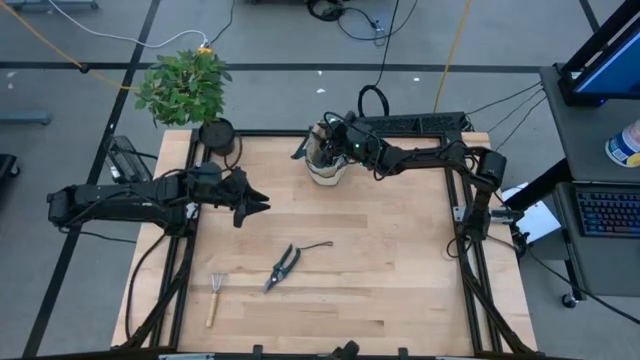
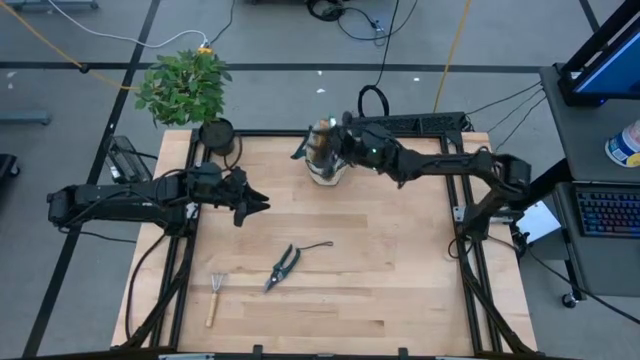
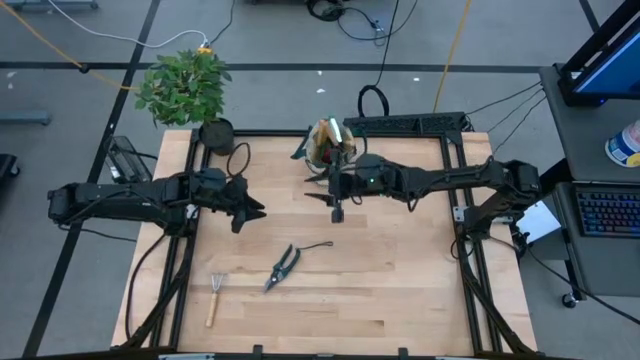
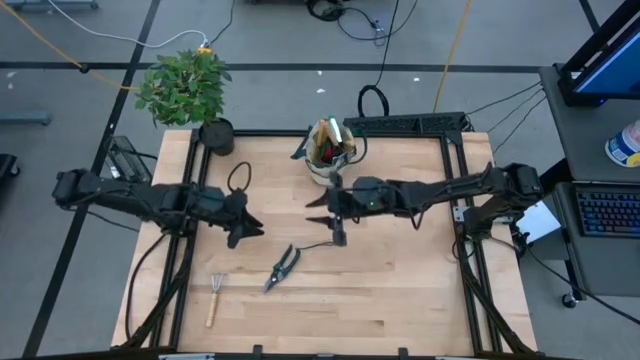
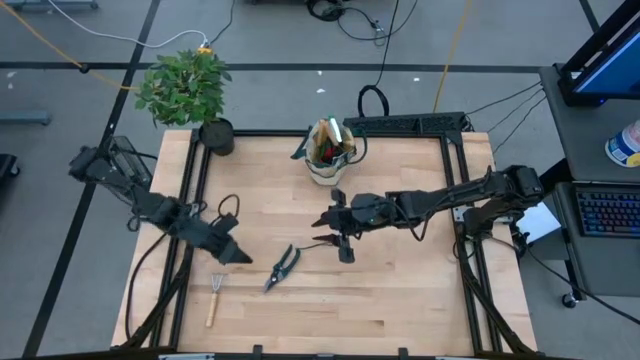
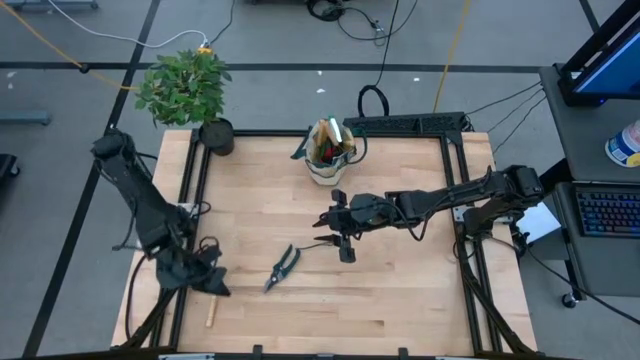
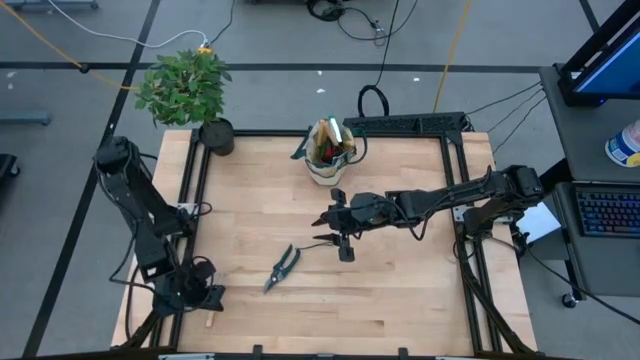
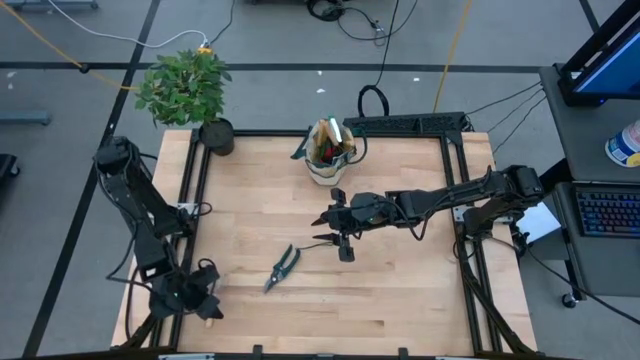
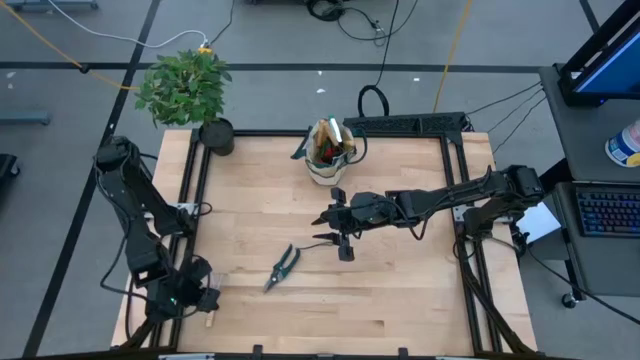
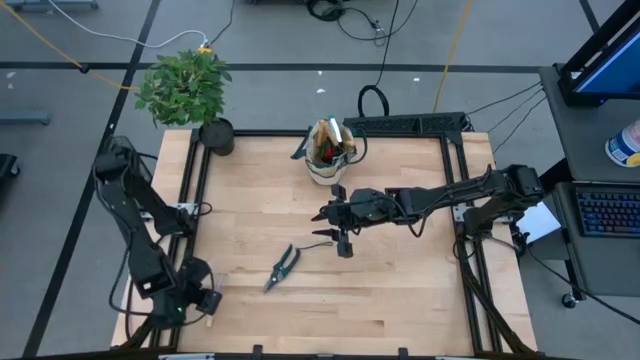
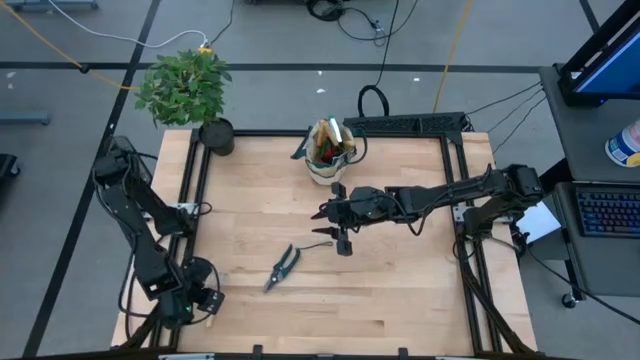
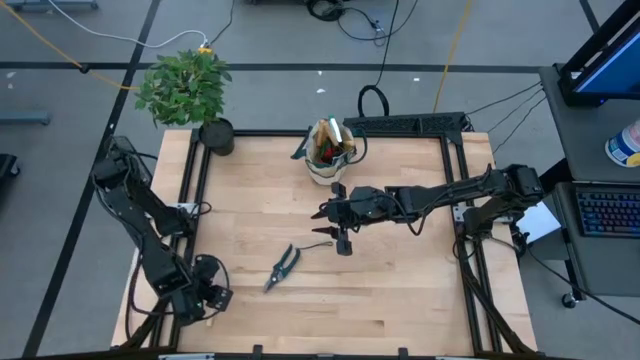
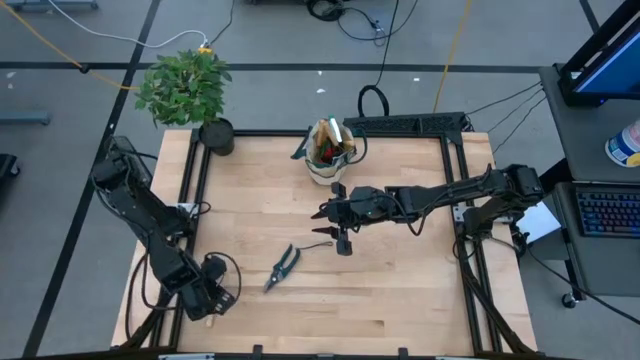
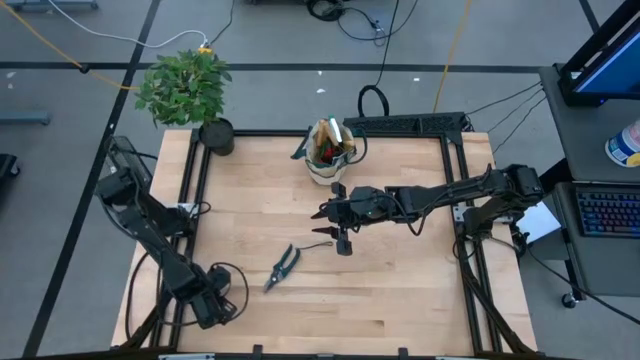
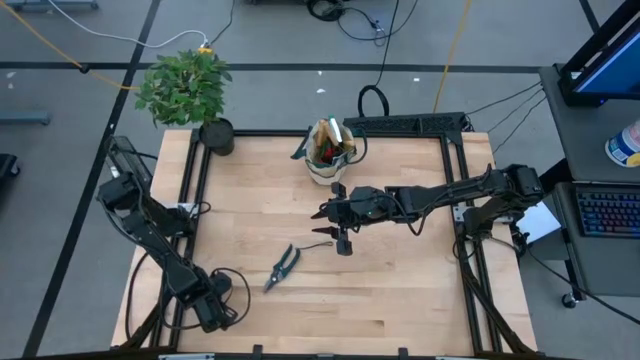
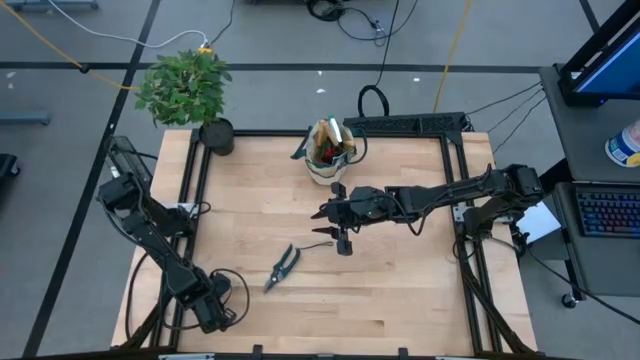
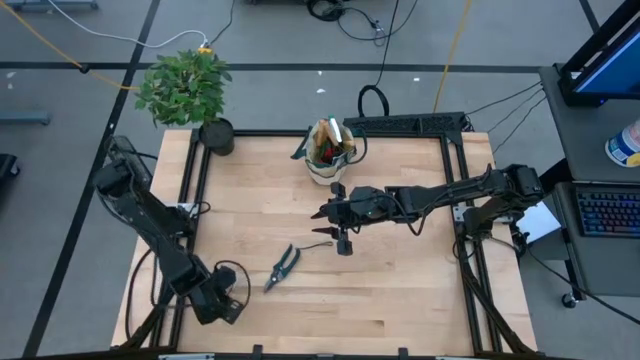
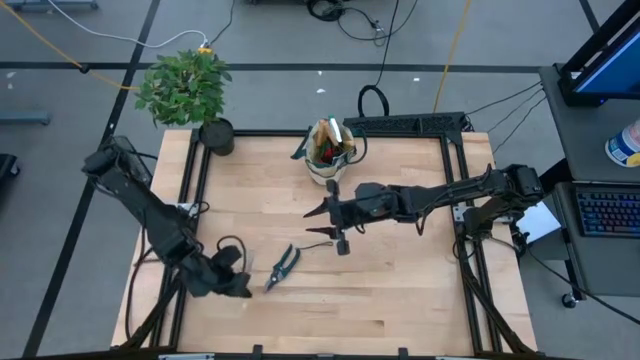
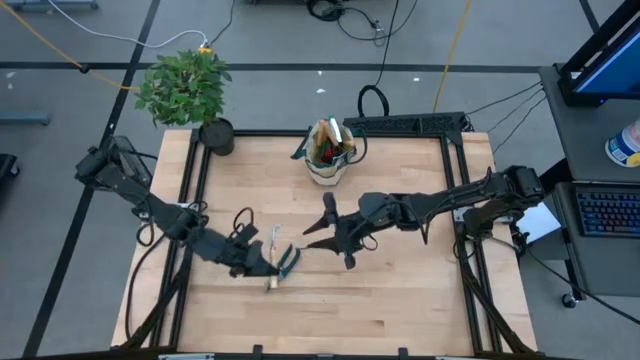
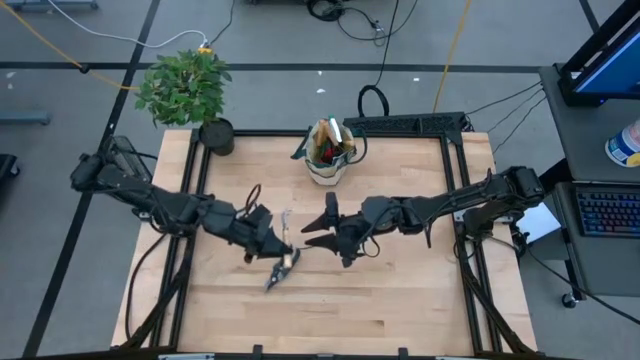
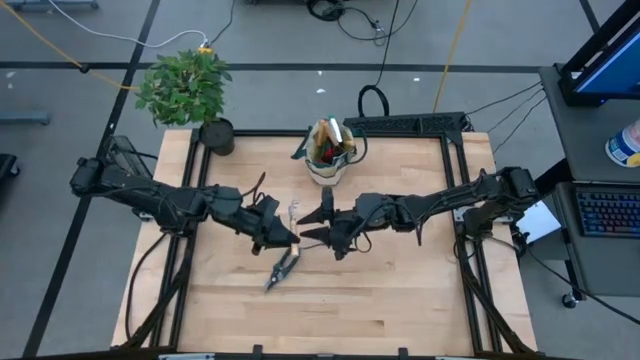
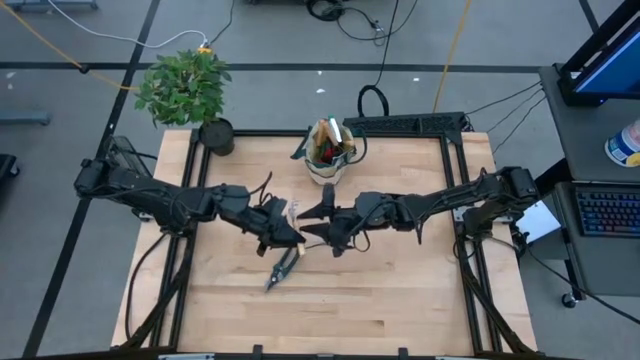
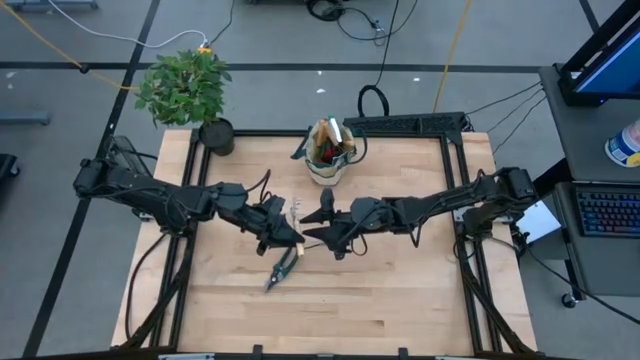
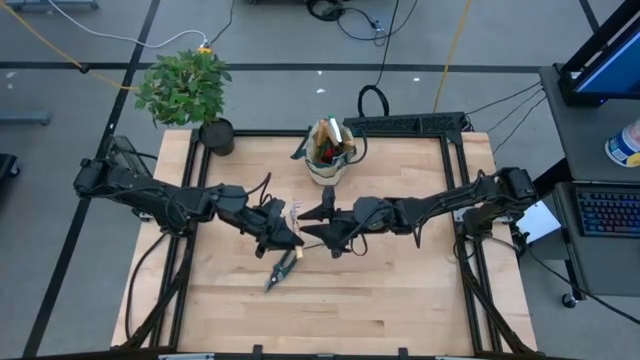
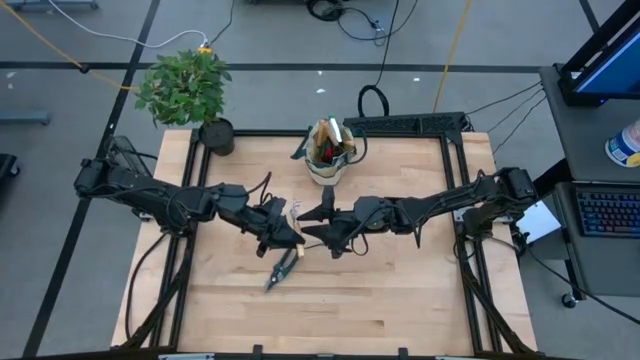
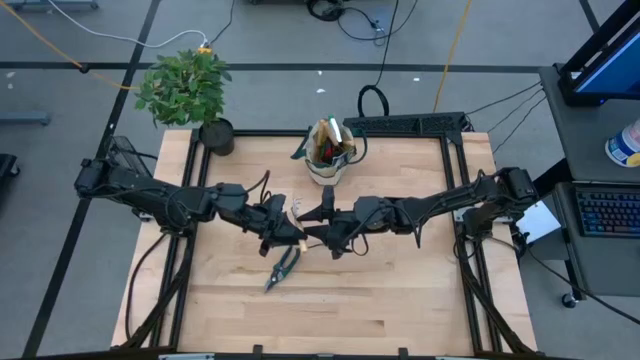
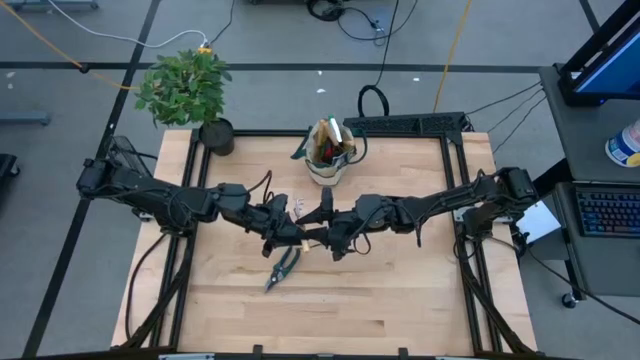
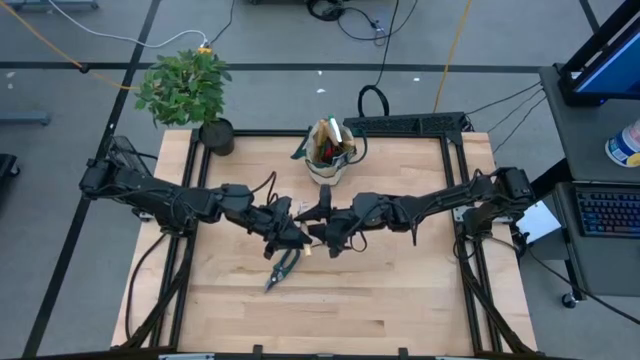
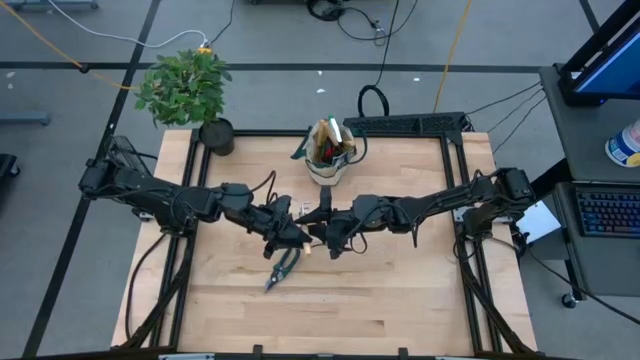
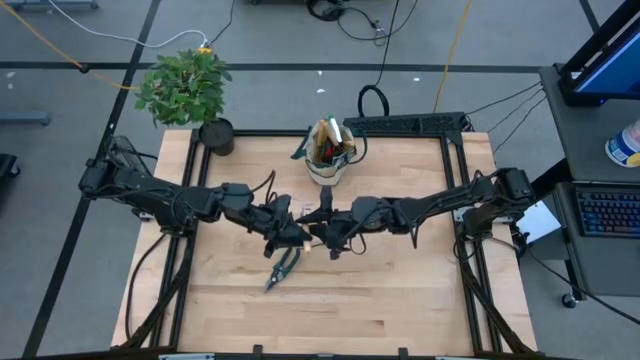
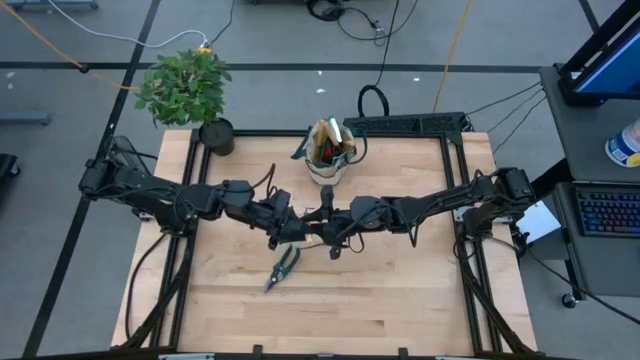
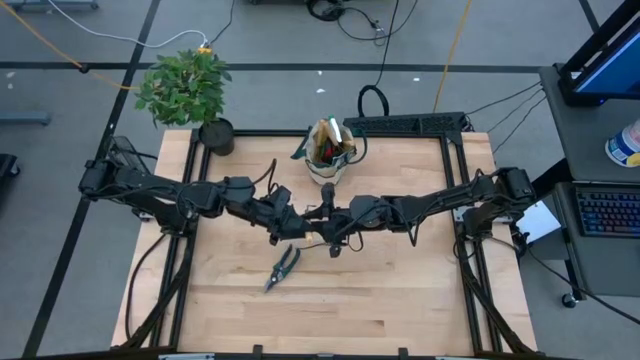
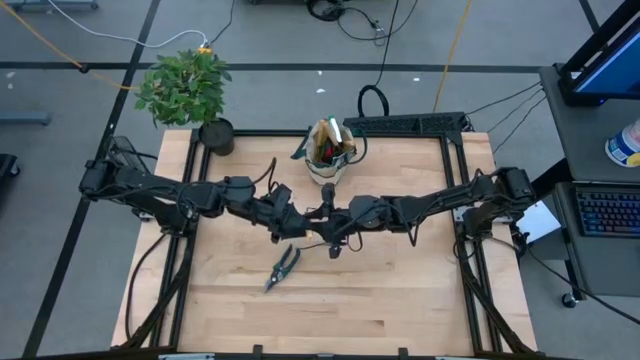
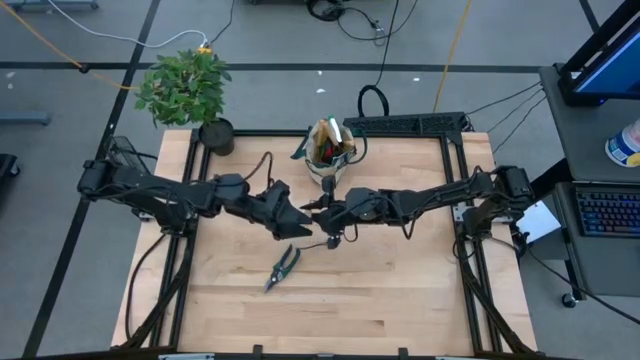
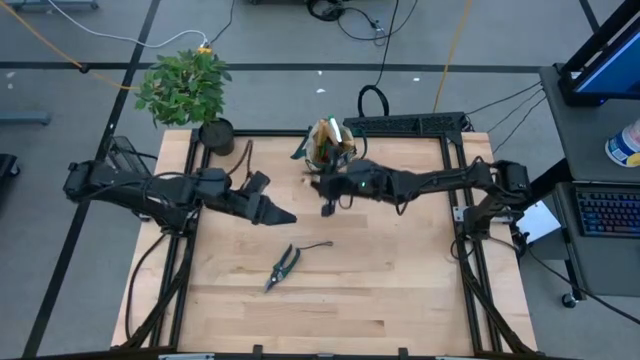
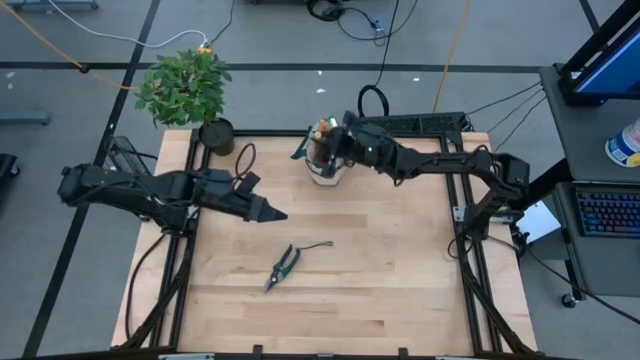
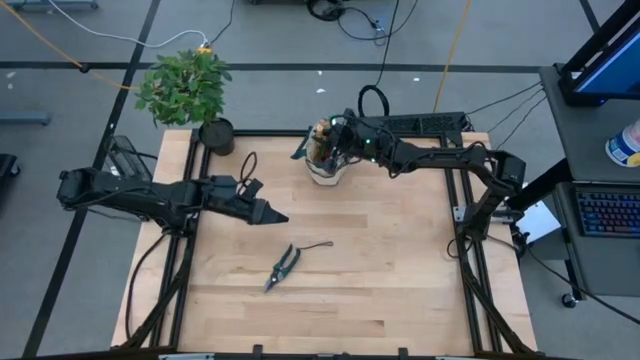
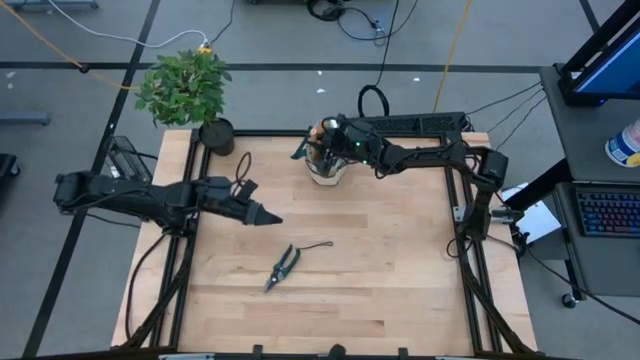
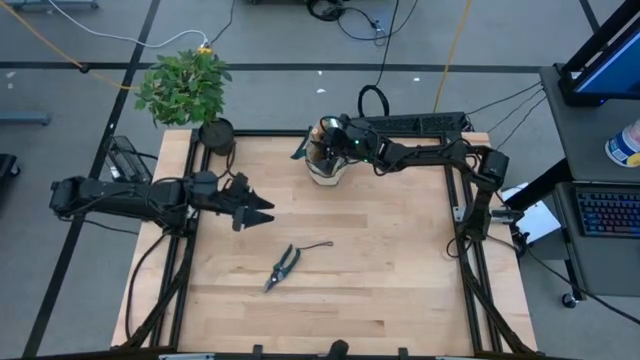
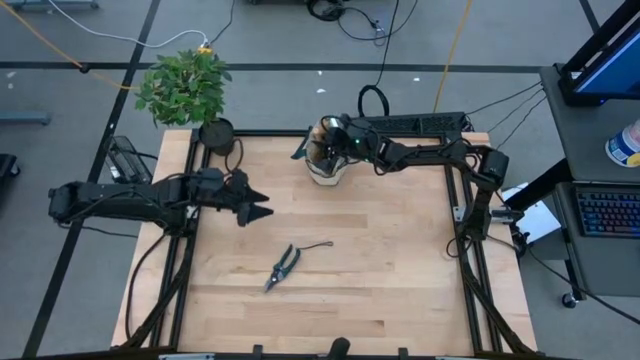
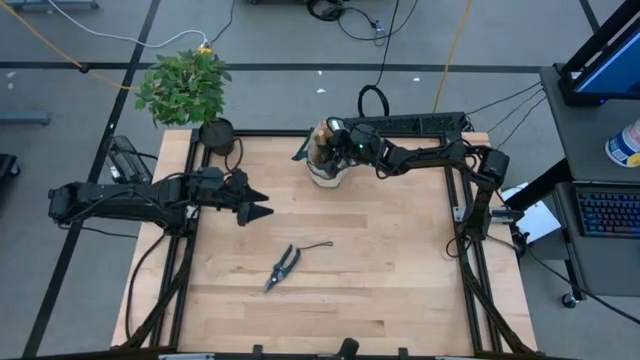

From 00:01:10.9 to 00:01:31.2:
Task: Pick & Place Garden tools in Gardening bag
Put the brown hand rake into the brown gardening bag
